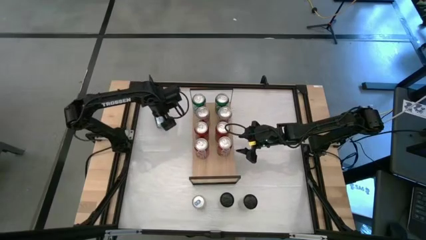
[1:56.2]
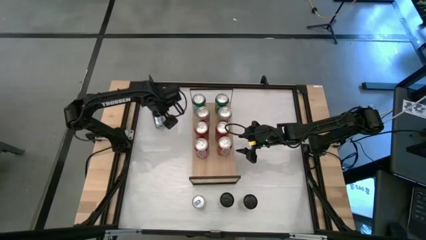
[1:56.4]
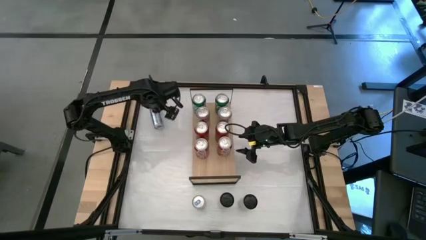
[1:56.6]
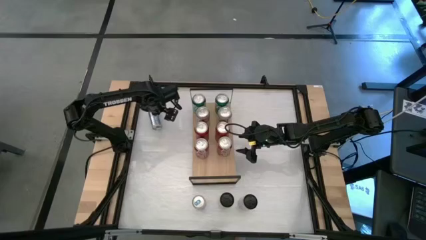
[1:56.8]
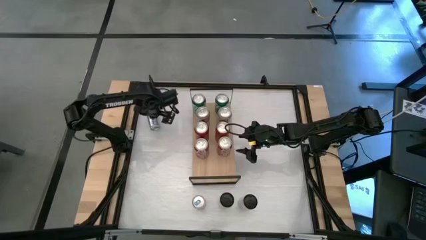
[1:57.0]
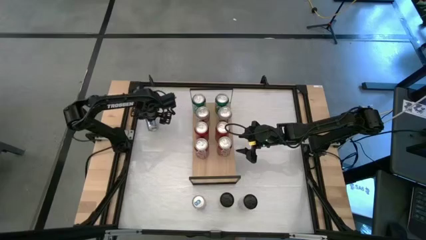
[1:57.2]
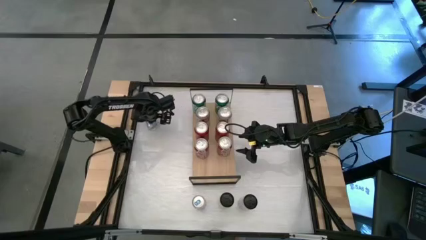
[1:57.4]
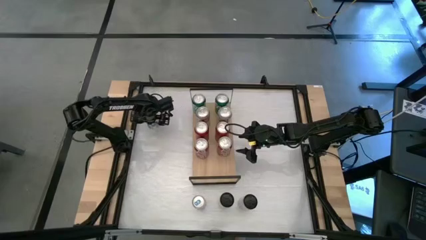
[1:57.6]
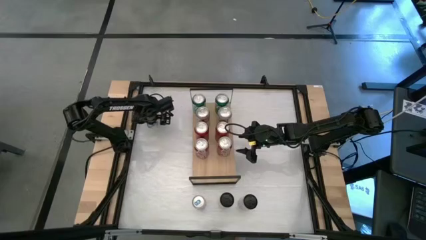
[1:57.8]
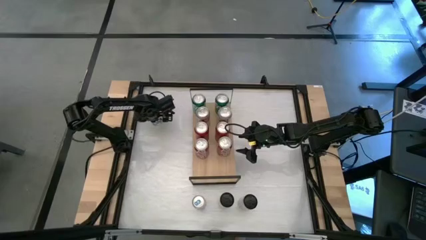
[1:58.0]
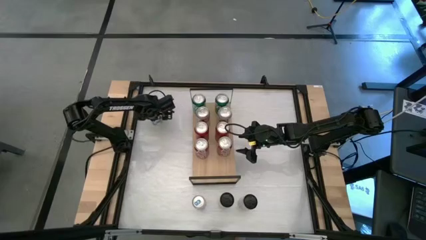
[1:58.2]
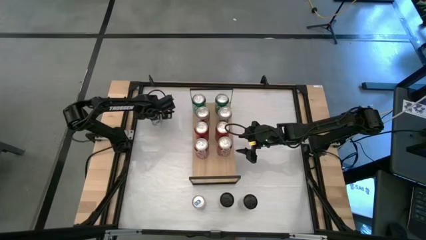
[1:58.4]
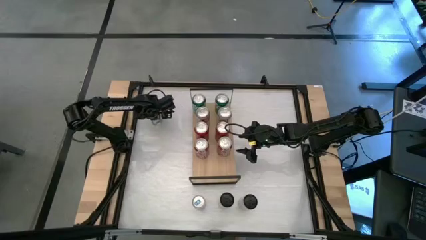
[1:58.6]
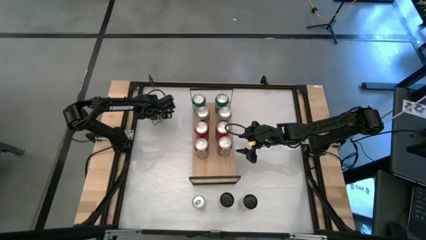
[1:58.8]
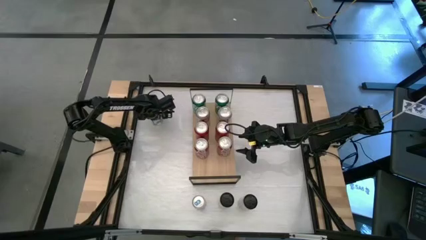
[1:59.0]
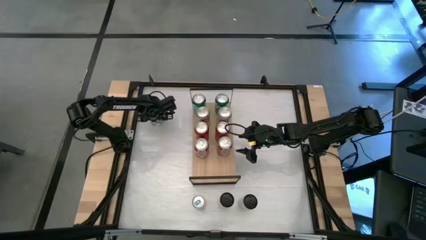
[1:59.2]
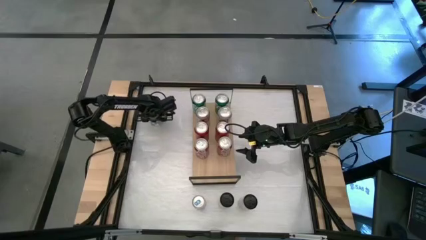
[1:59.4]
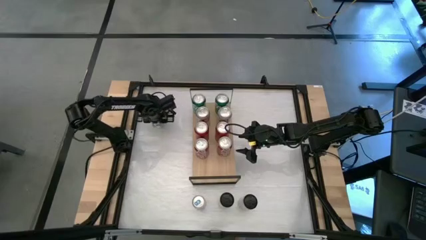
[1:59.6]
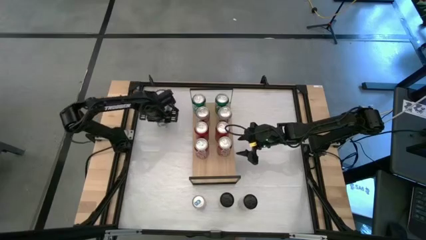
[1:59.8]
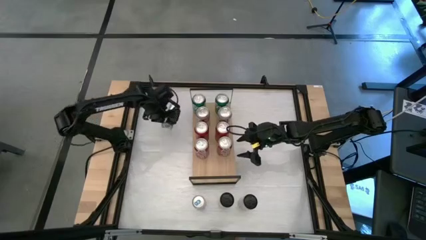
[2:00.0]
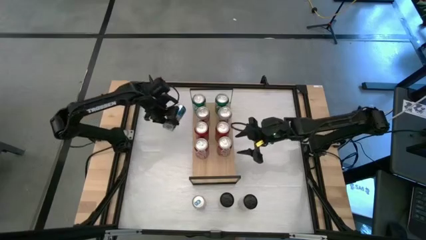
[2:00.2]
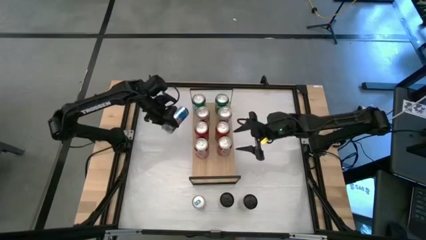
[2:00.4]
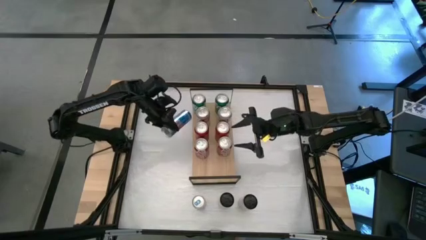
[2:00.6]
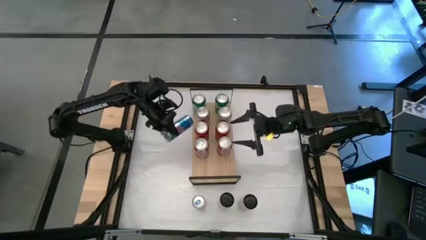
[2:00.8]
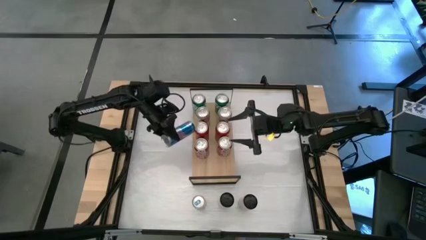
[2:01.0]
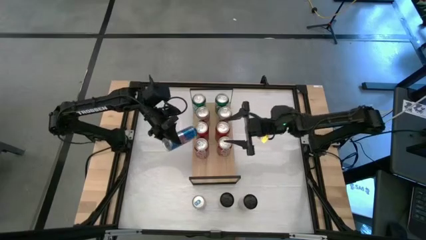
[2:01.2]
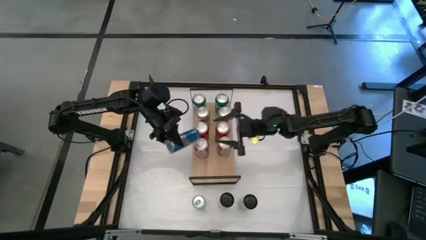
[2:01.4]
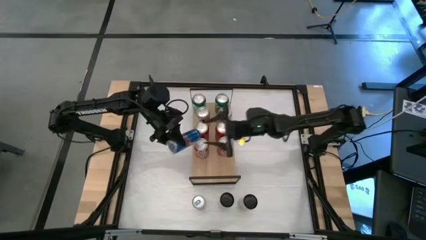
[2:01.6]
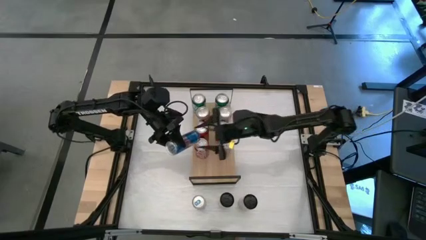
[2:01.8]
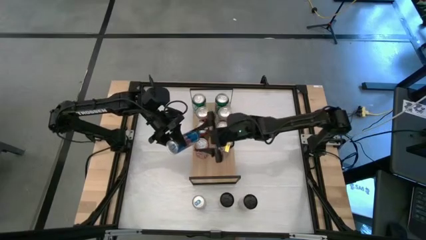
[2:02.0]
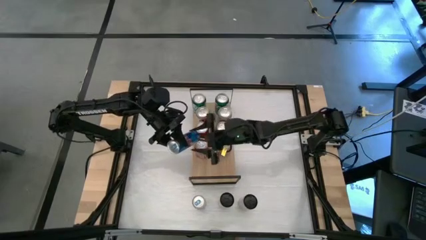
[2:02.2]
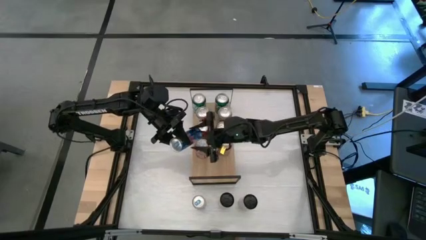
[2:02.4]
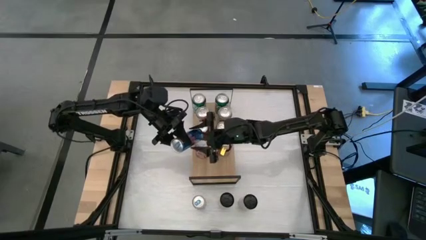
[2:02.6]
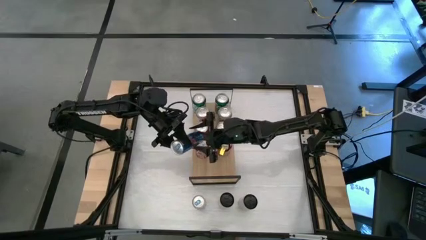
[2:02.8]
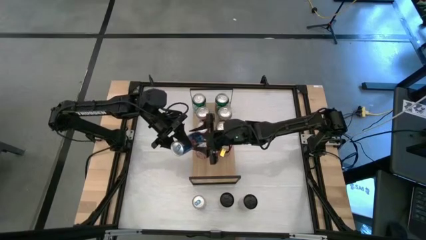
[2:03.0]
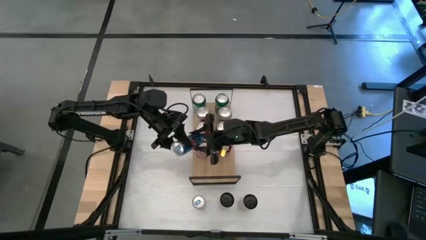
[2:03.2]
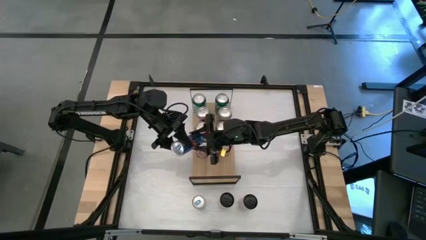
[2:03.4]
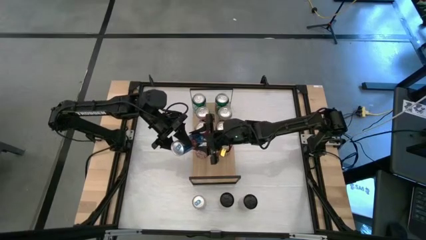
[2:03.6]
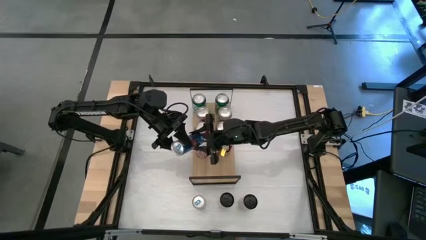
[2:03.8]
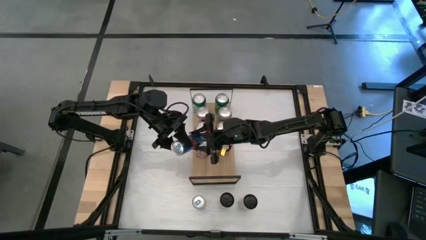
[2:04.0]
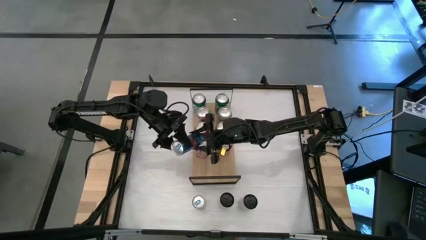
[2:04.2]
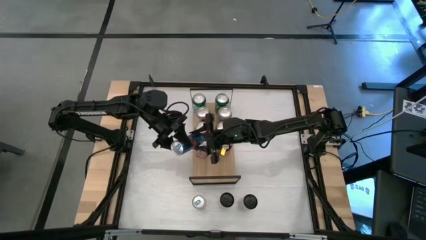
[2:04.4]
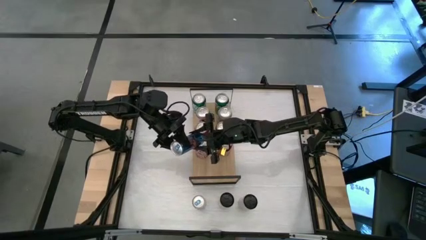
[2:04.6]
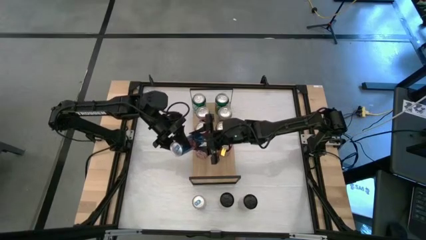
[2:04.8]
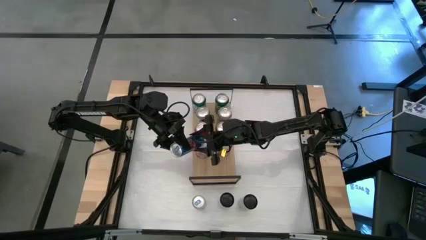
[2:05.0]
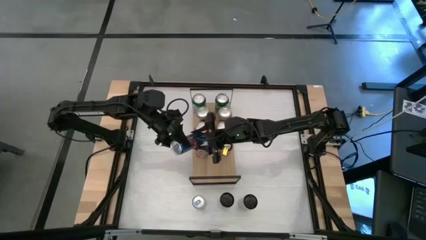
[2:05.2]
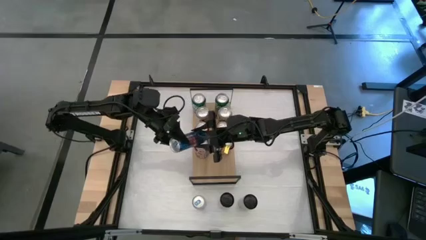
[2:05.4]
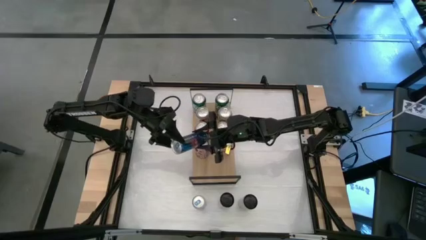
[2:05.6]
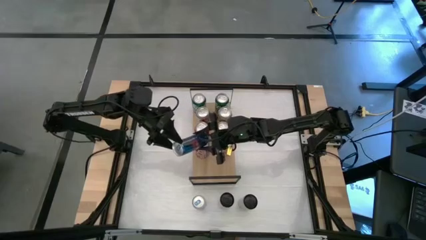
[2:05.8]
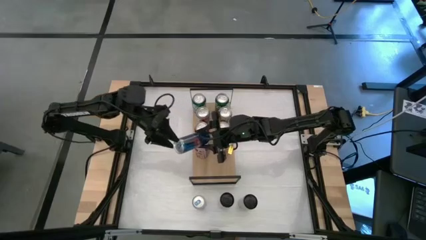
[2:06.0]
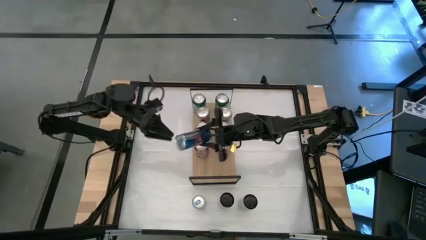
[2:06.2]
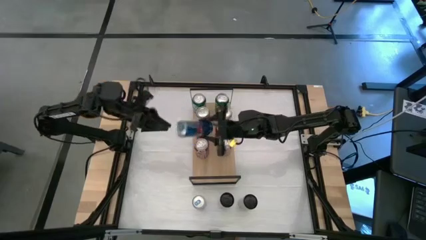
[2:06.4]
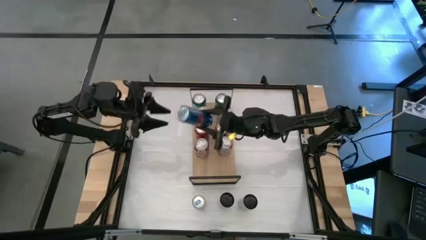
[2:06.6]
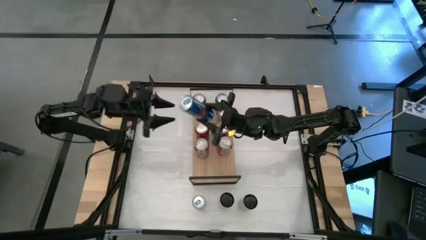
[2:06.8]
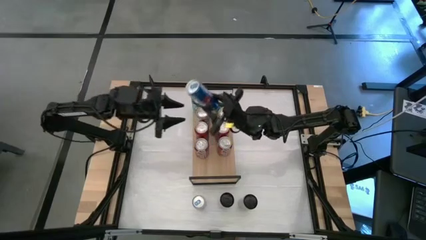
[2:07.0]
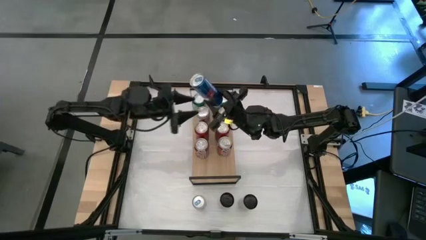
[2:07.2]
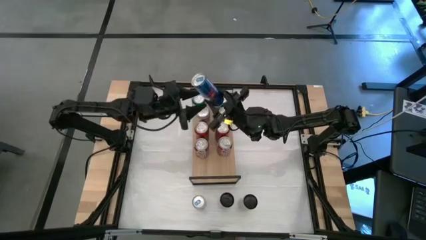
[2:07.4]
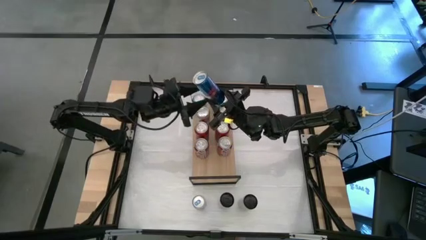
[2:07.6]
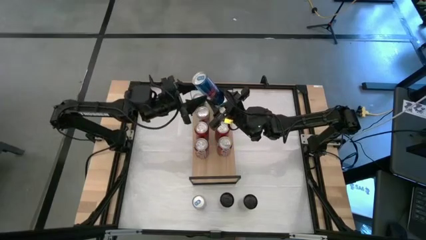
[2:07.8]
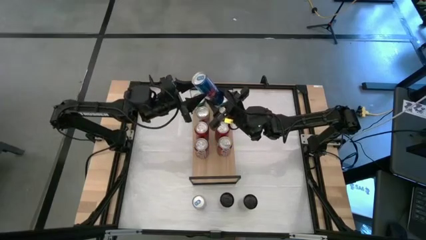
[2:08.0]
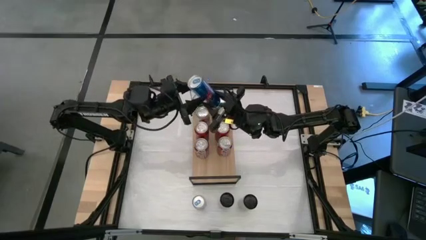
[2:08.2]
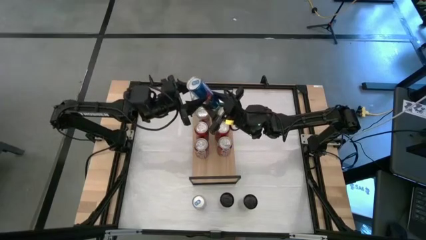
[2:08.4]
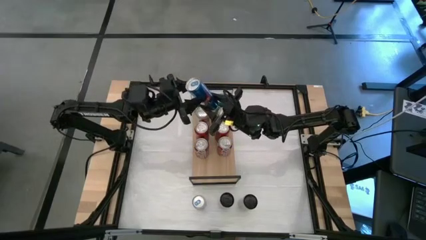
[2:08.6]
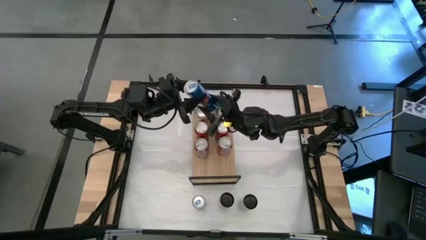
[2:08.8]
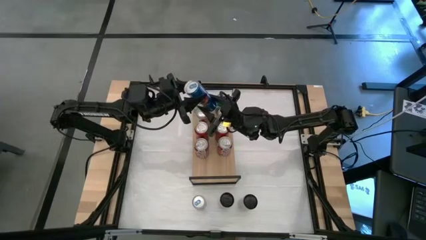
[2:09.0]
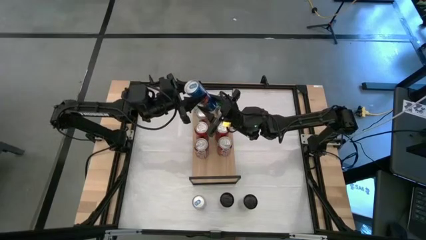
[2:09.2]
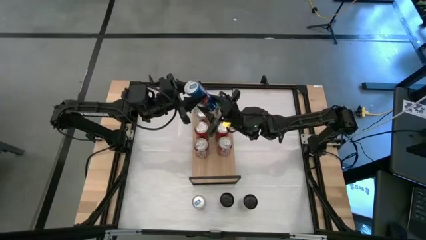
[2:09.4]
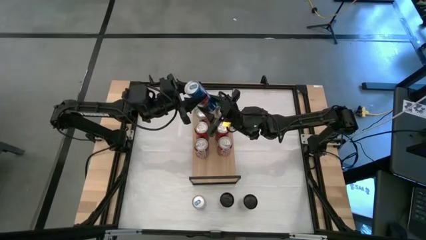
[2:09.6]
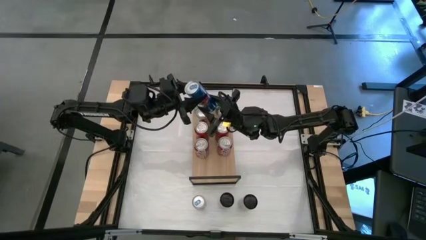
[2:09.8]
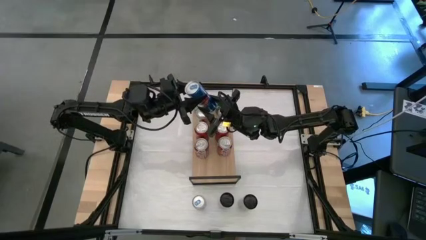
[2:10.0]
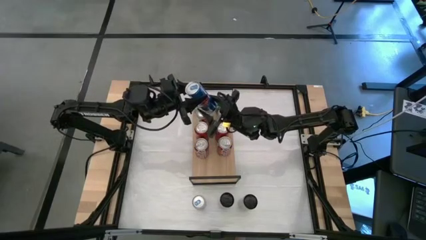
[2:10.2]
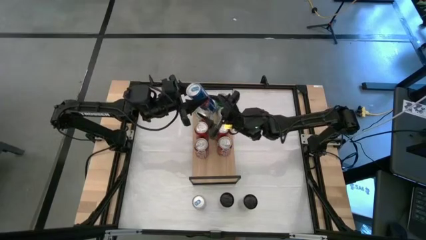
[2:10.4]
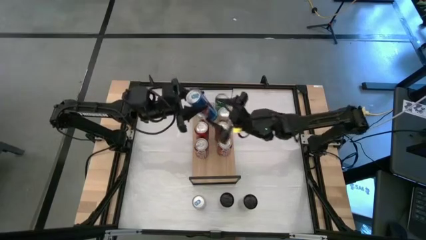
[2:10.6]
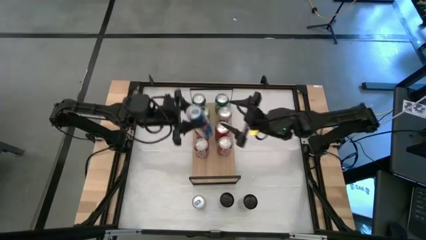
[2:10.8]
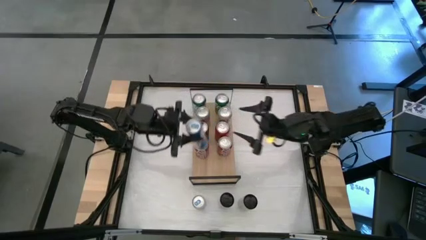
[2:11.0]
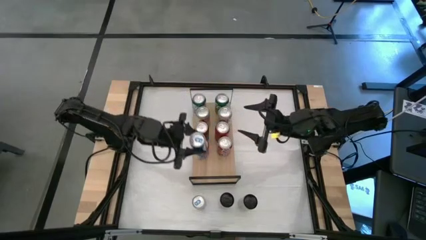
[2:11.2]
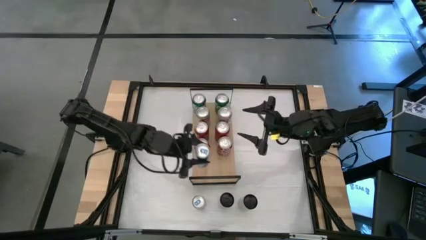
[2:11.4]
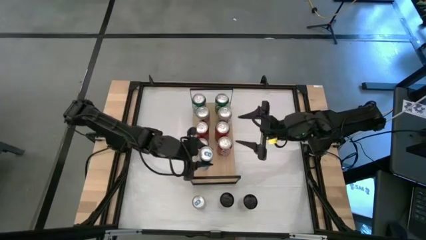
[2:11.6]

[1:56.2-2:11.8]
Task: Place canned beverage on shelf
Put the top blue soda can on the shelf
